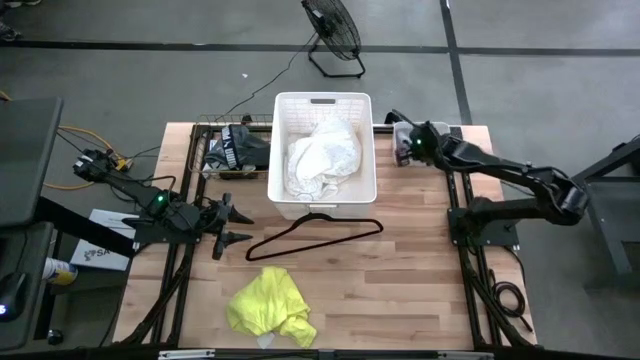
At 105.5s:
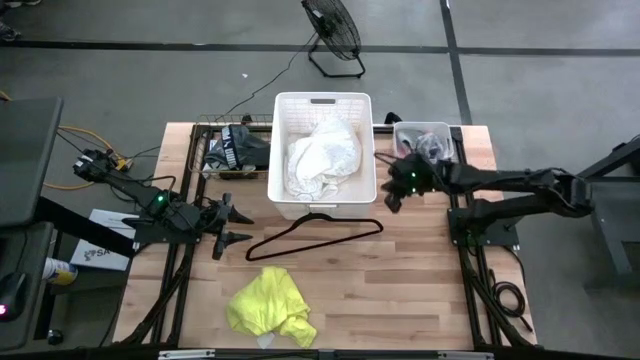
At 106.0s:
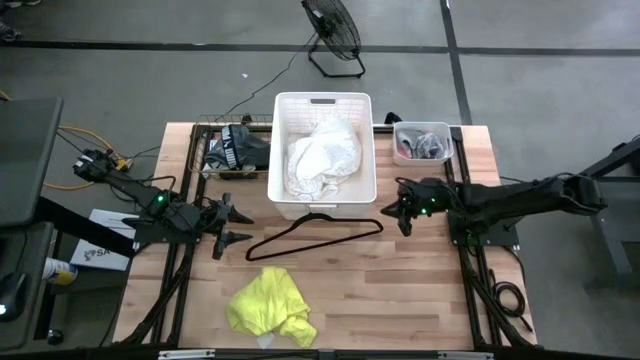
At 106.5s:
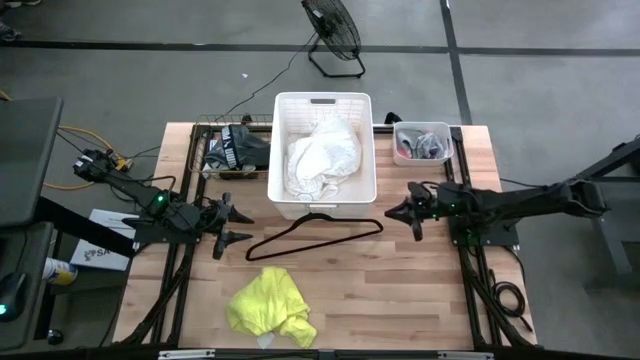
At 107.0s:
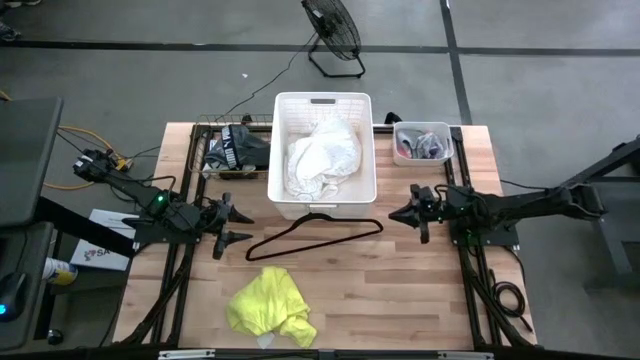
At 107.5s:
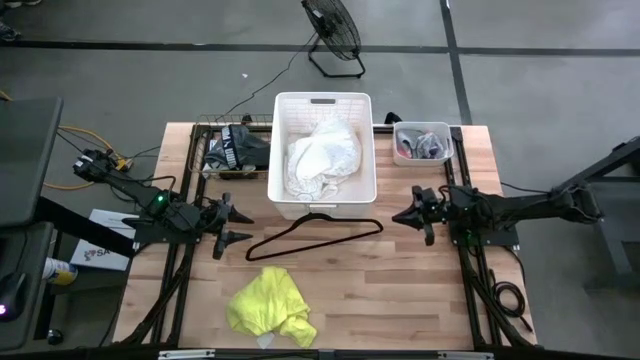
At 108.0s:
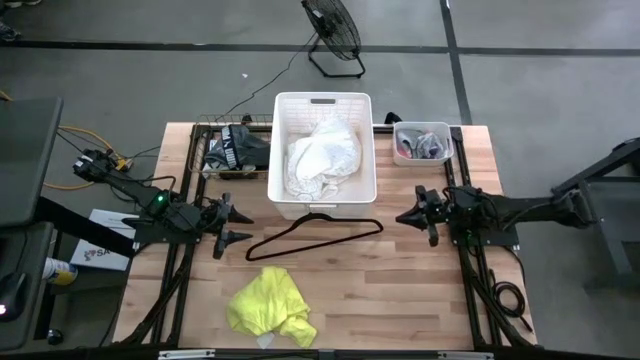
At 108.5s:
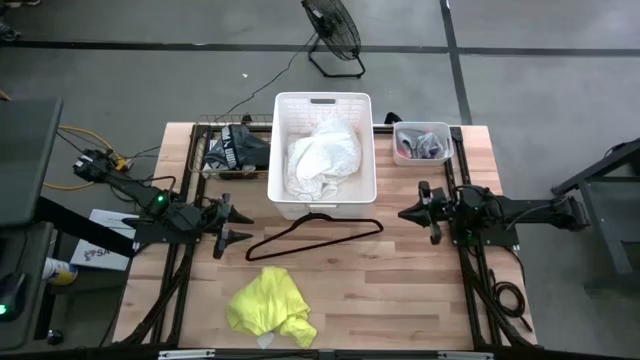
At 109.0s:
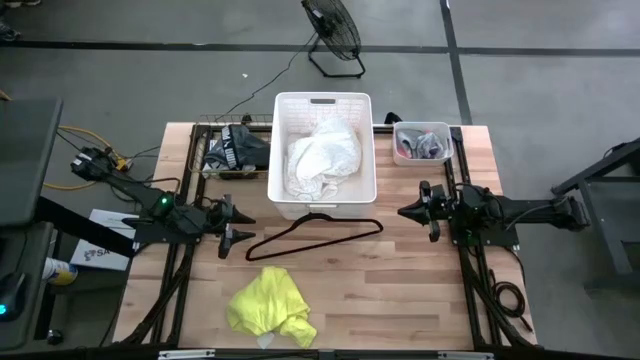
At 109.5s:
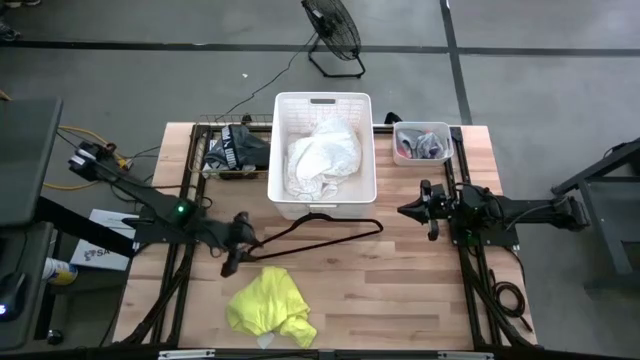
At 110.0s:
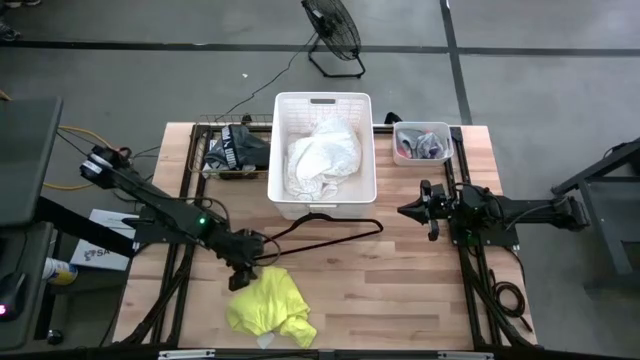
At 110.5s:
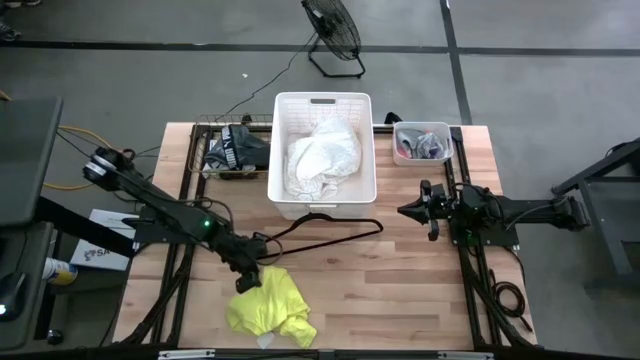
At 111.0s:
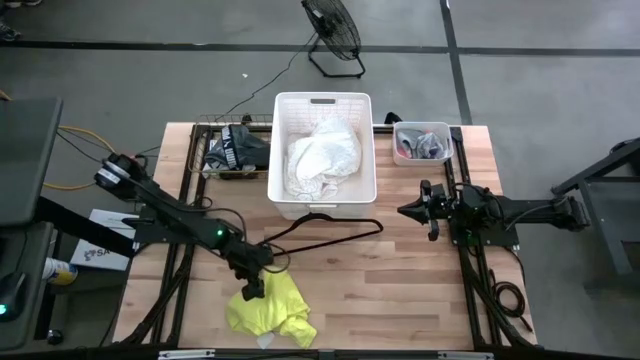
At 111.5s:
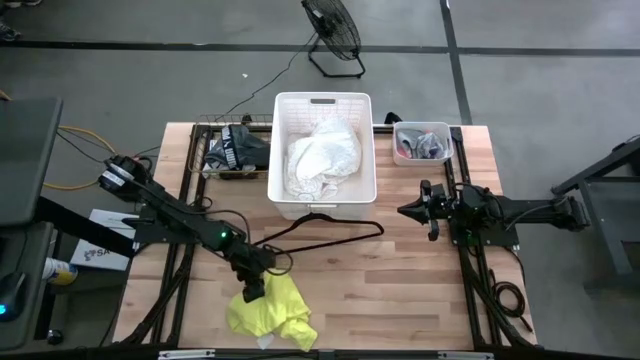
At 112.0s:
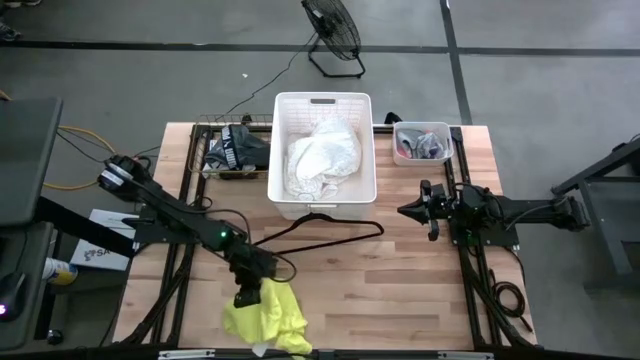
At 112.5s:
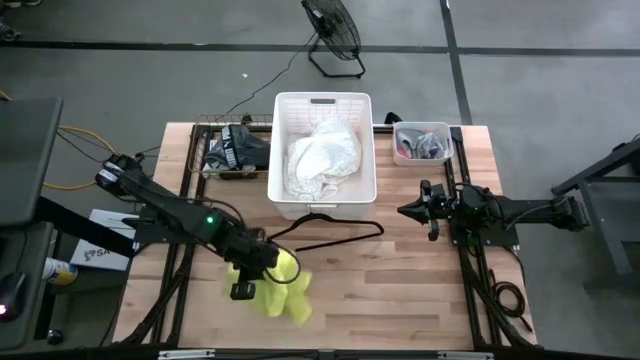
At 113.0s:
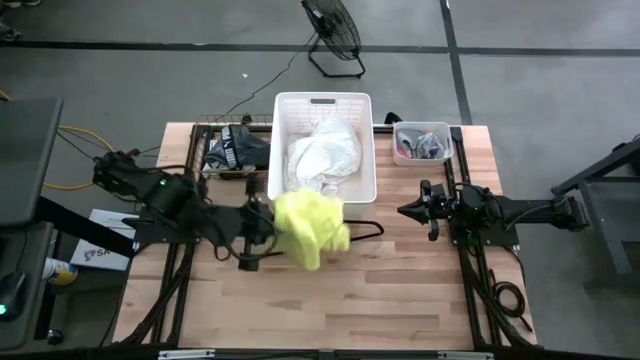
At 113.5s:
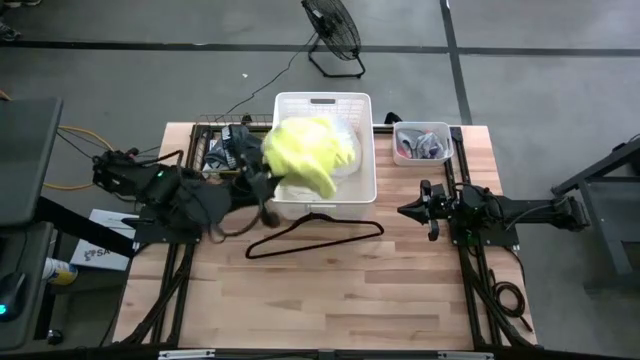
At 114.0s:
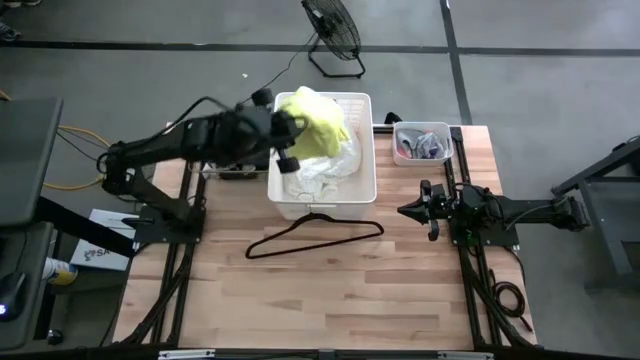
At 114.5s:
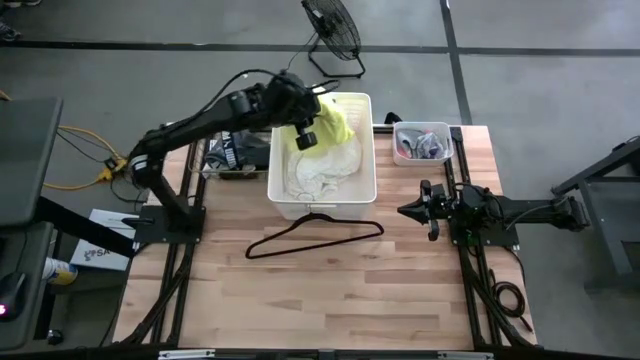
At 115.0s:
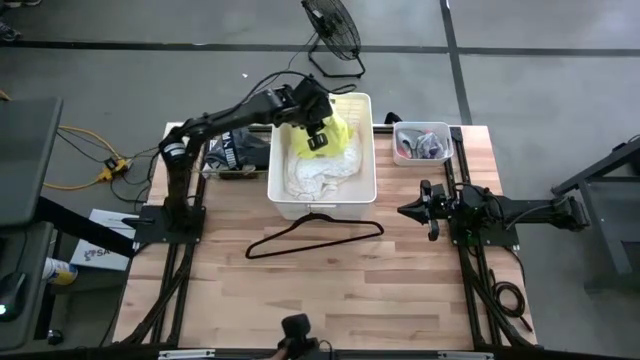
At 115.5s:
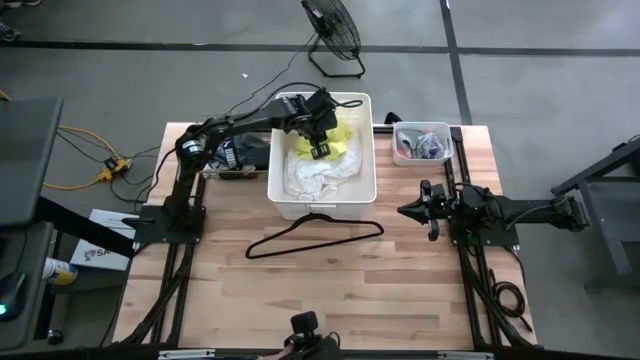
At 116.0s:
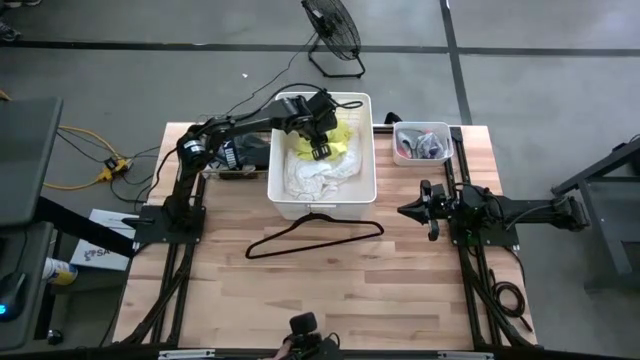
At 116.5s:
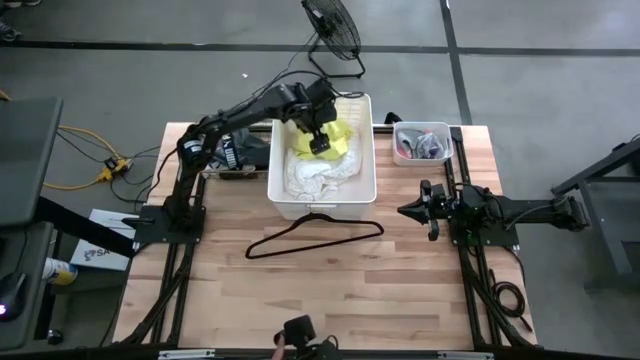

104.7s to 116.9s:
Task: Pick & Place Cloths
Put the yellow shirt into the large white bin

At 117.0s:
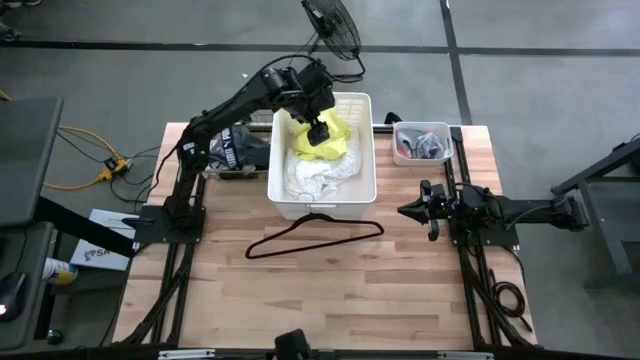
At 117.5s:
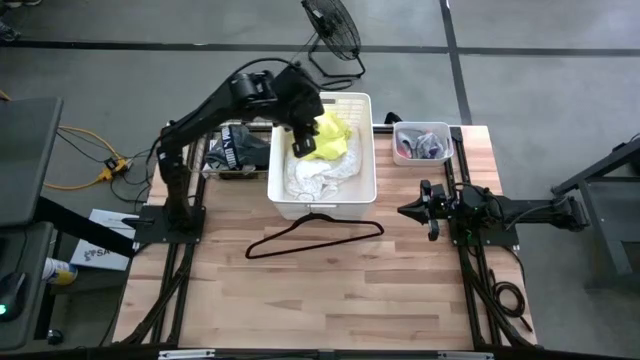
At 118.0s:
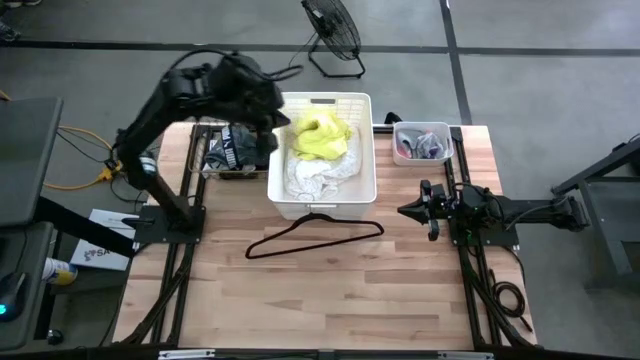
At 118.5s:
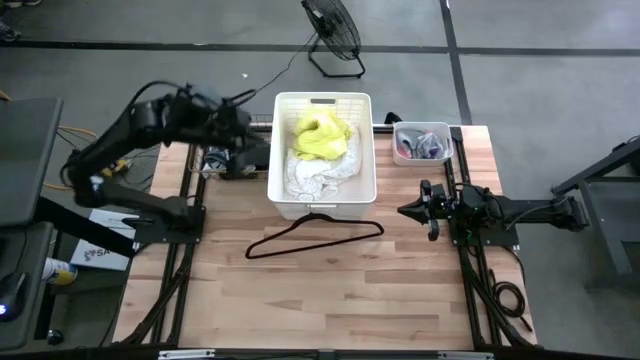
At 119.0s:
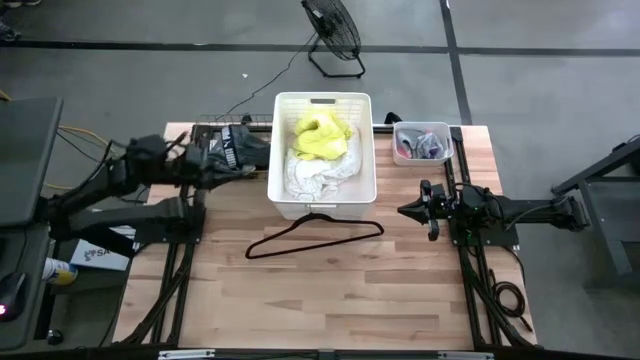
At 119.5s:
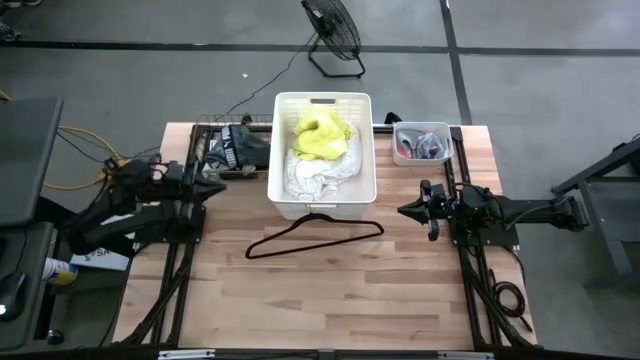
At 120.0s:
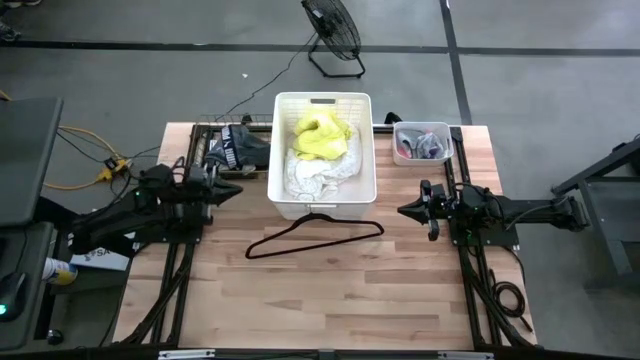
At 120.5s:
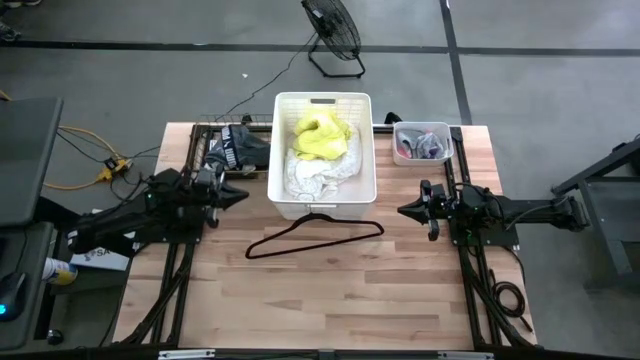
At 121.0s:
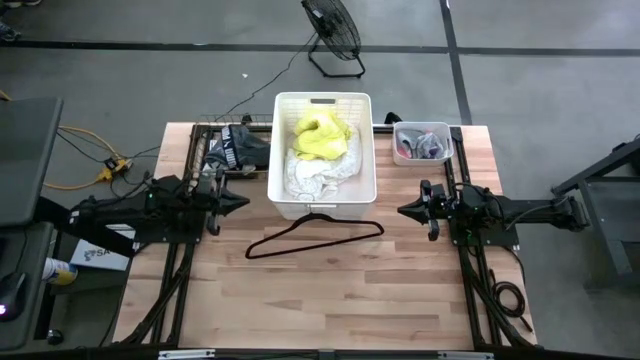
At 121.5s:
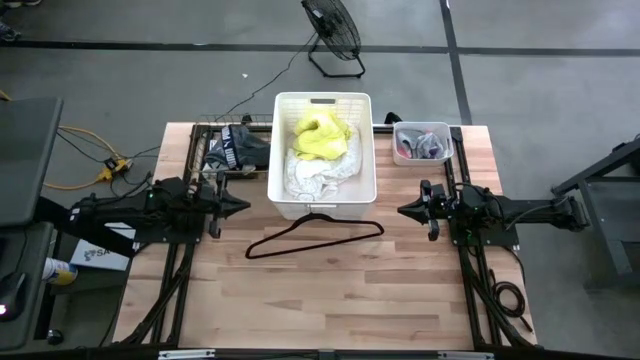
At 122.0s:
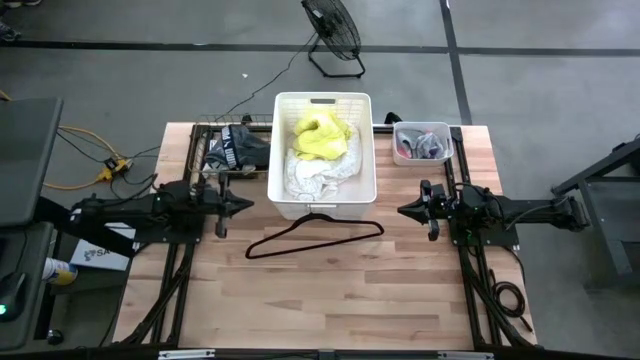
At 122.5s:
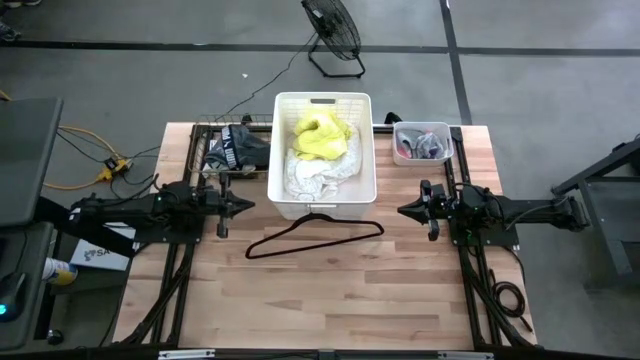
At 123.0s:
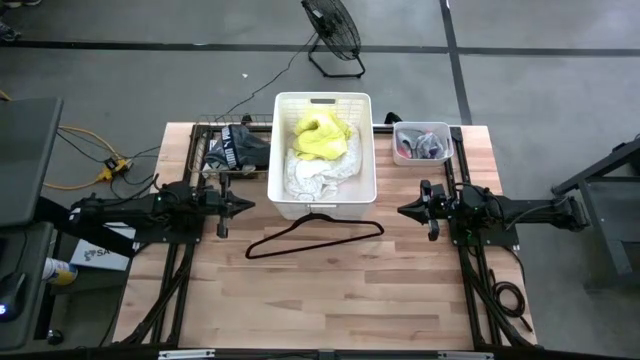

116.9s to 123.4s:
Return to Home Position

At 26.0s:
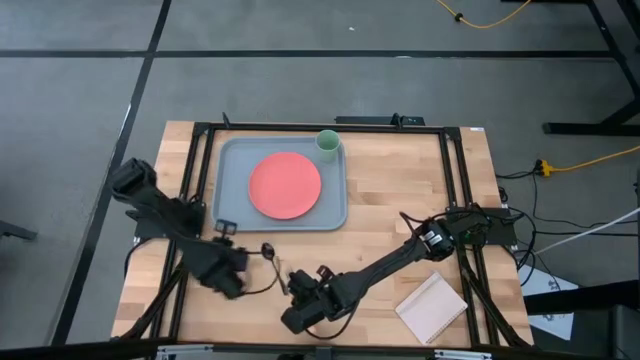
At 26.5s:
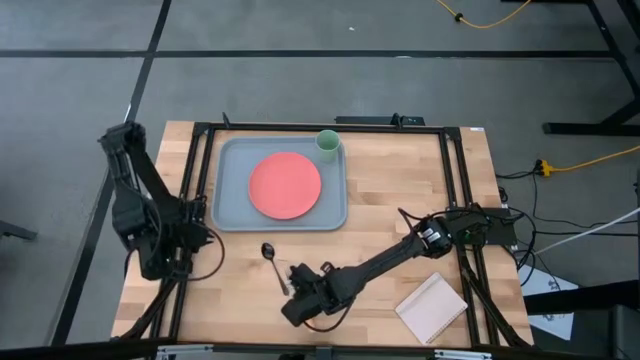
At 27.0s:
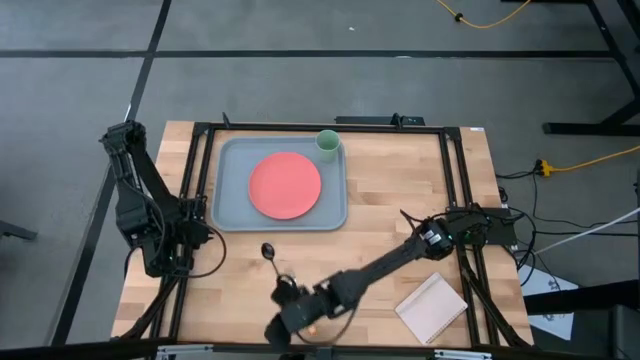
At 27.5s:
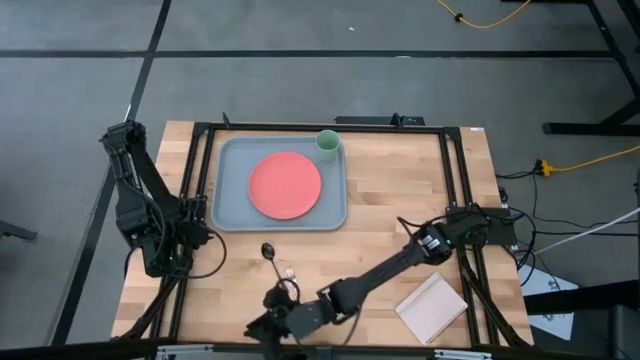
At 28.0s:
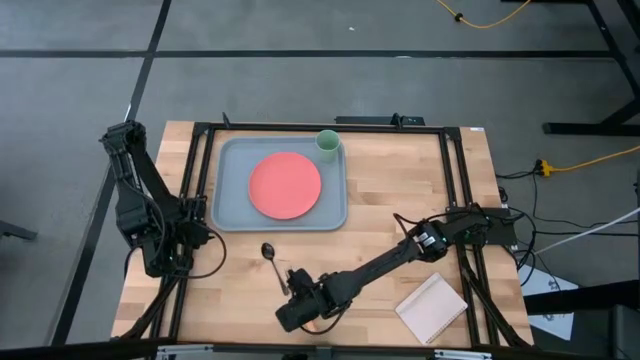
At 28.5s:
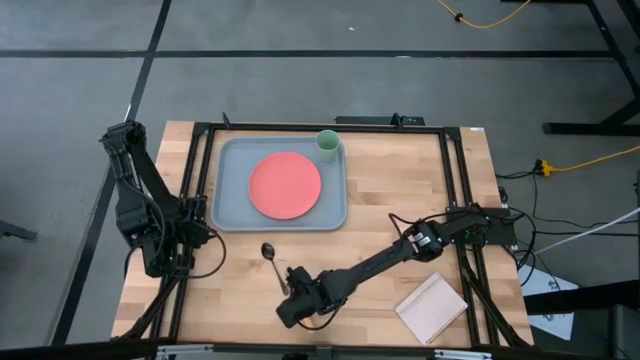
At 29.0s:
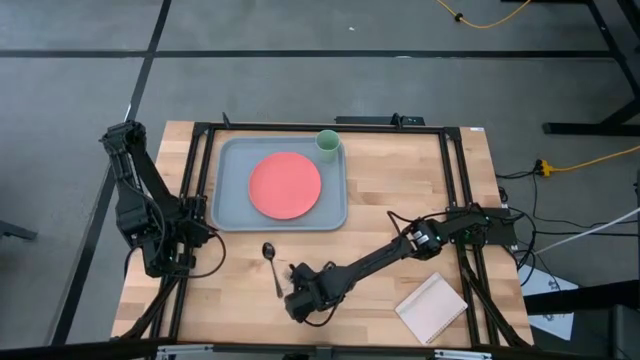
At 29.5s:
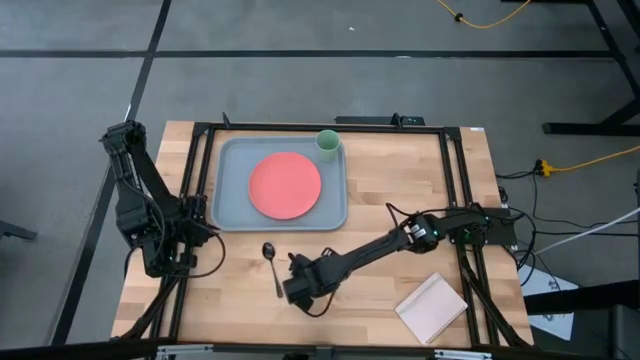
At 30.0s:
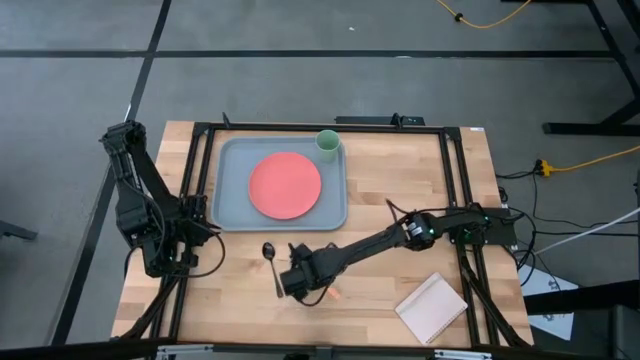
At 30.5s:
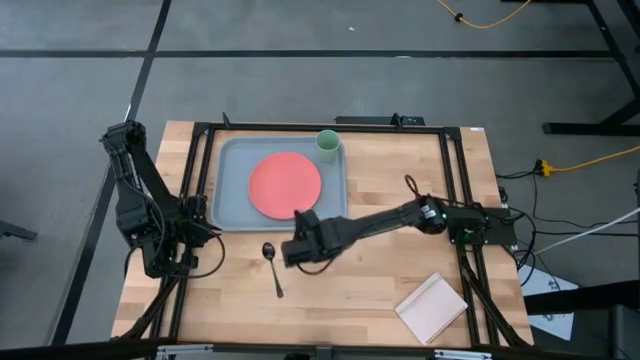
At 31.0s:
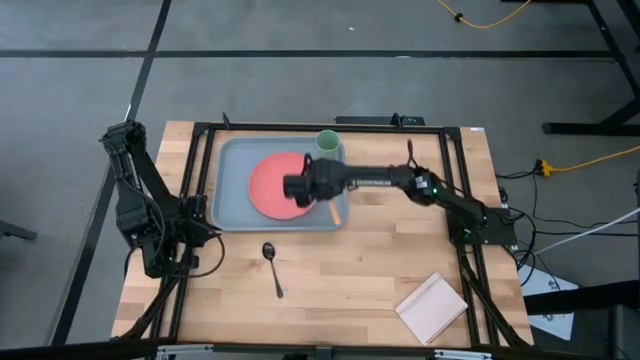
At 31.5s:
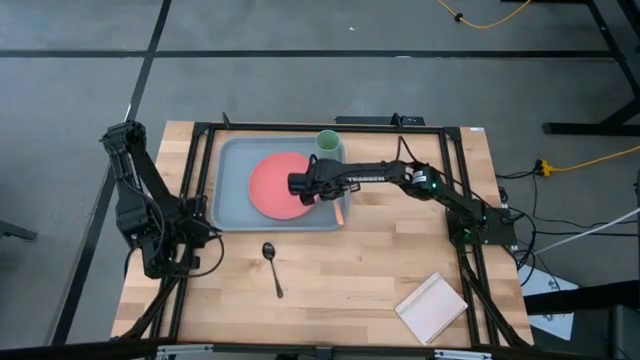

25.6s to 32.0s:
Task: Pick and place plate/cup/fork/spoon on tray
Put the light orange fork on the gray tray to the right of the light pink plate
